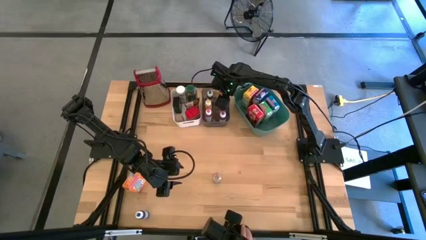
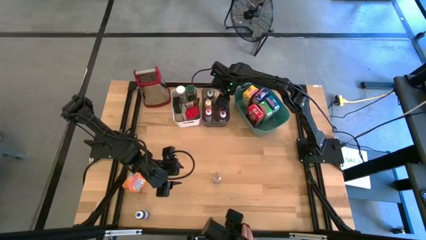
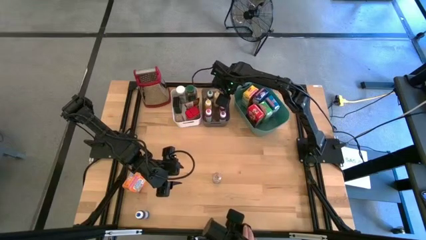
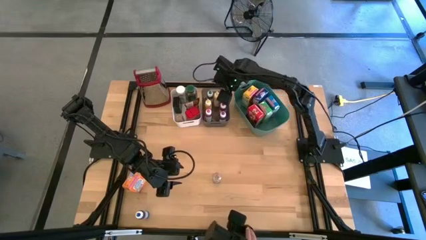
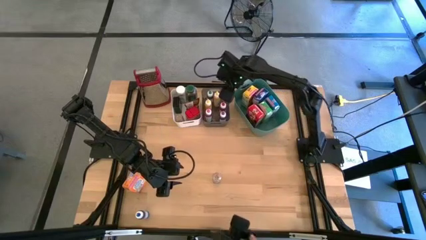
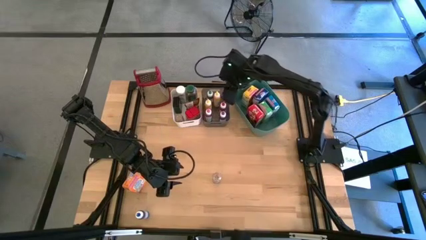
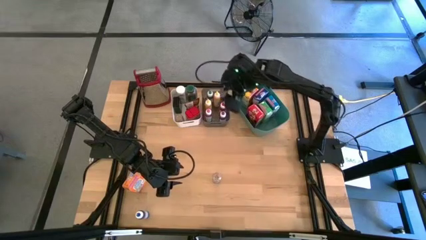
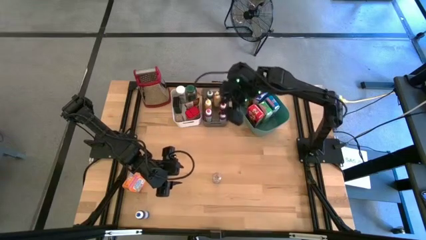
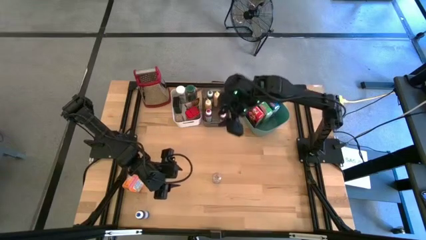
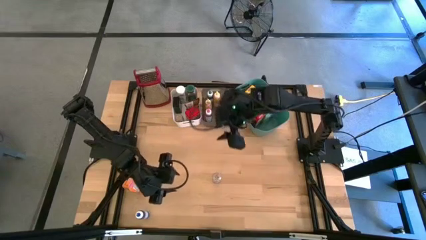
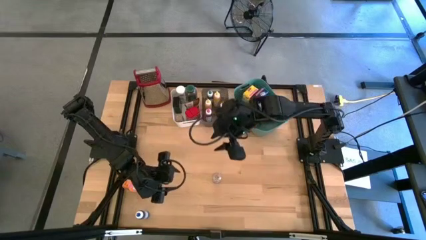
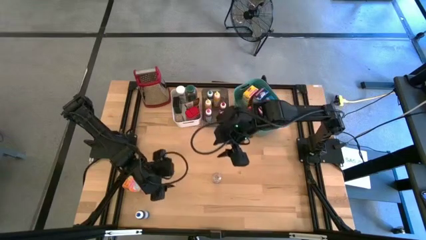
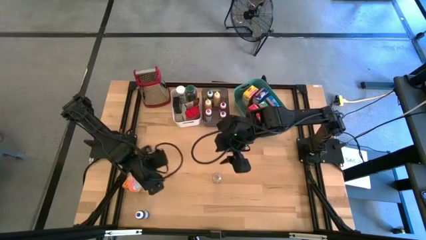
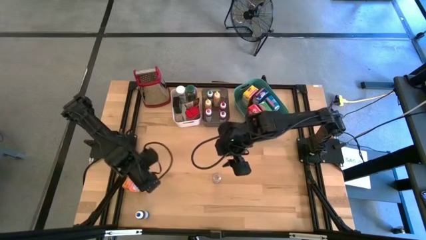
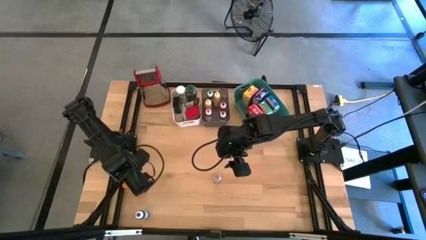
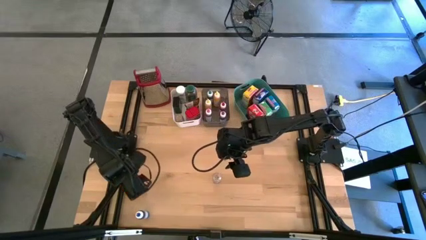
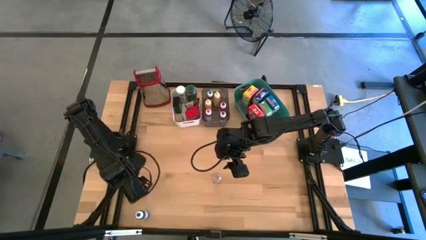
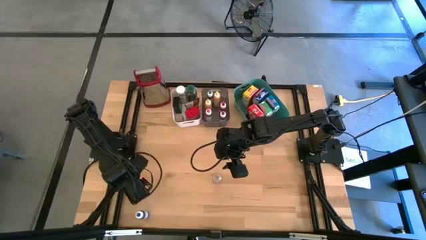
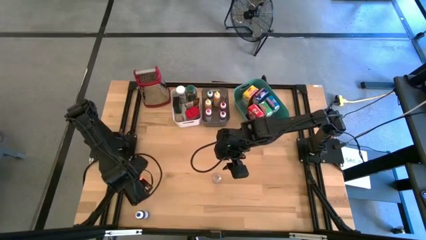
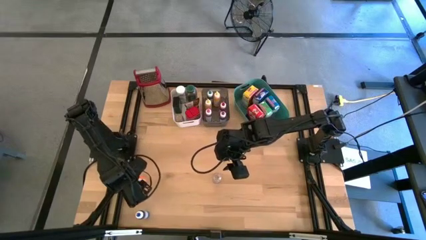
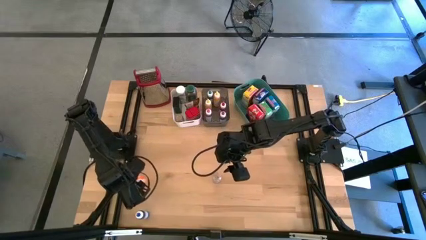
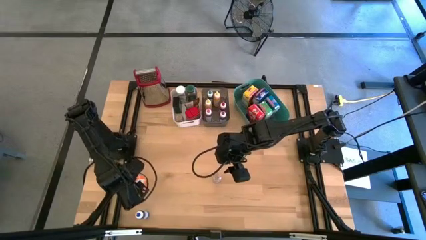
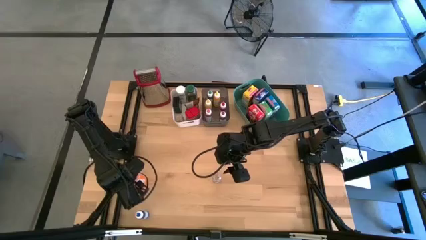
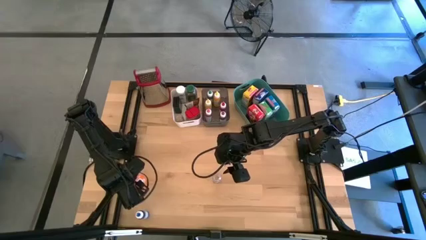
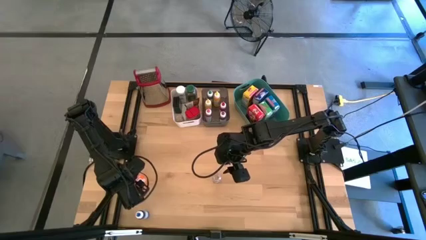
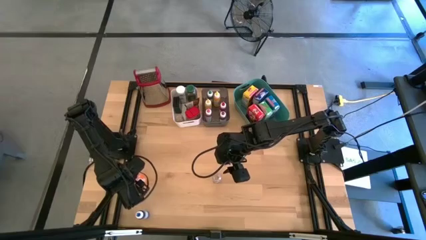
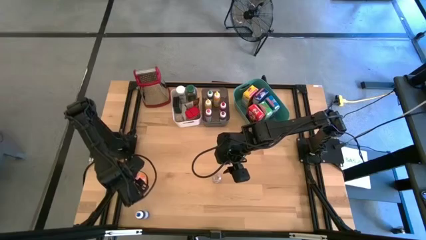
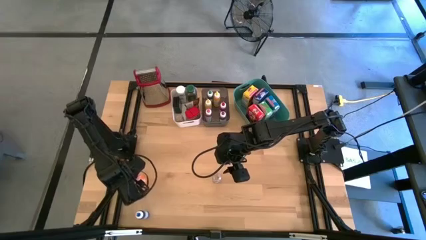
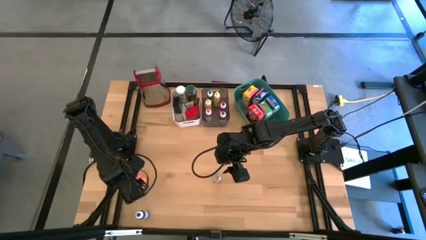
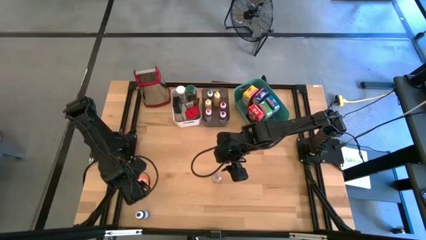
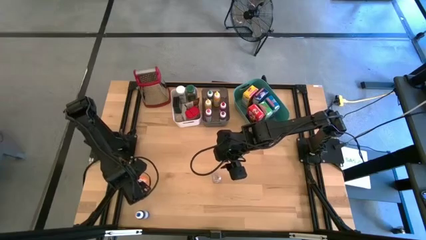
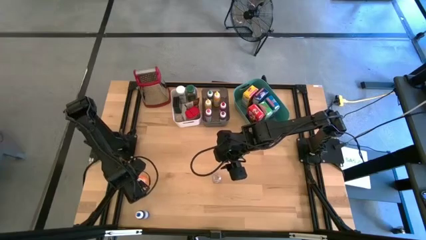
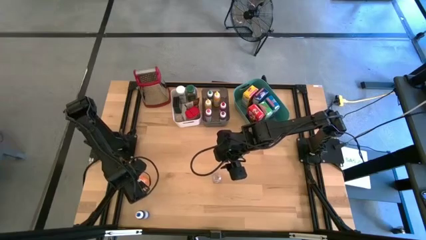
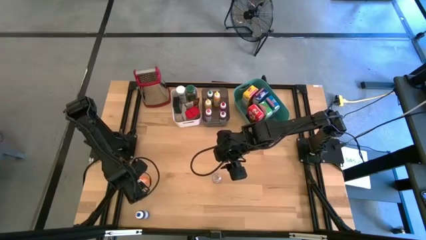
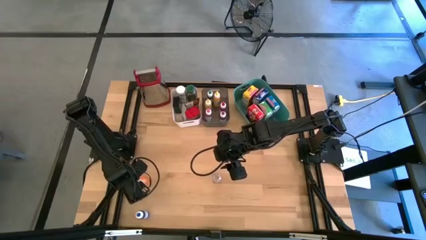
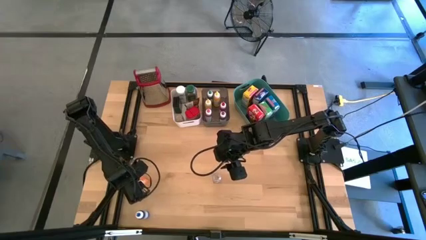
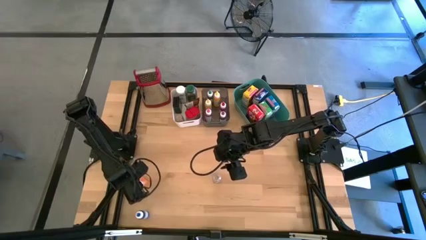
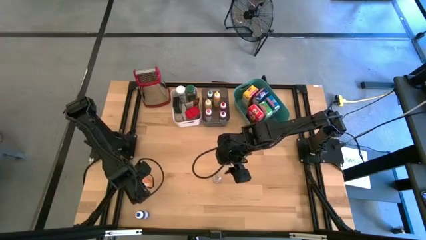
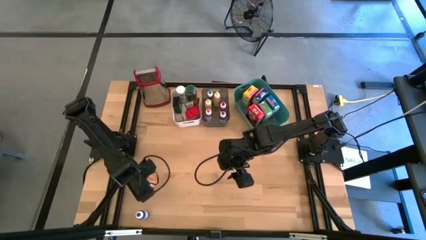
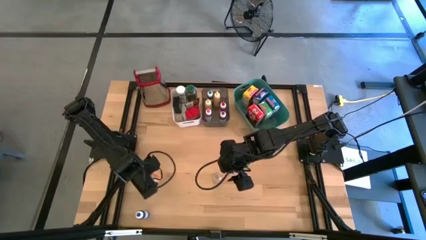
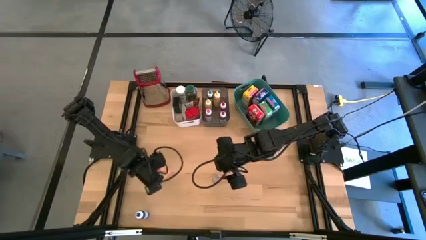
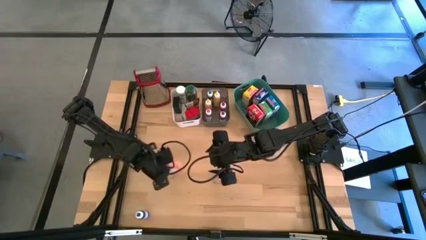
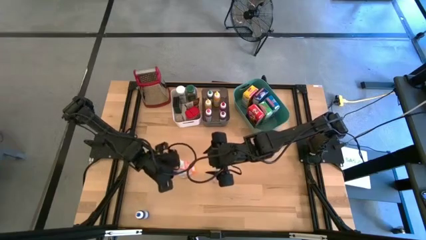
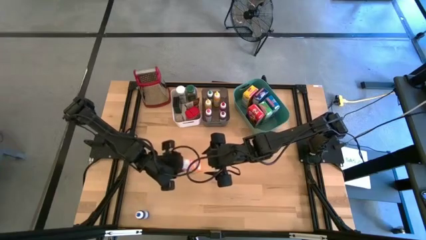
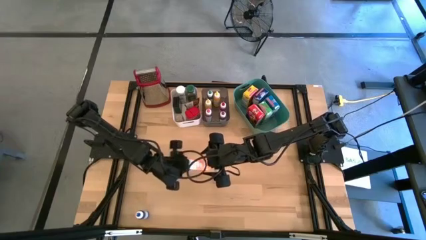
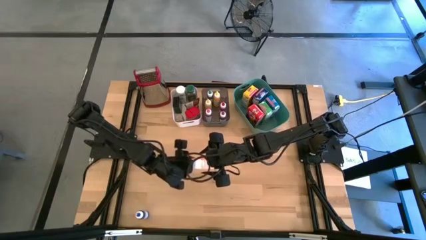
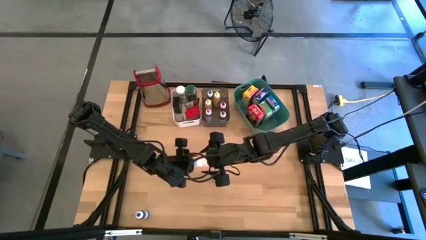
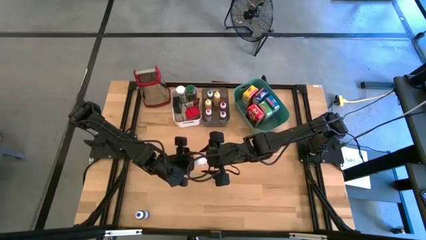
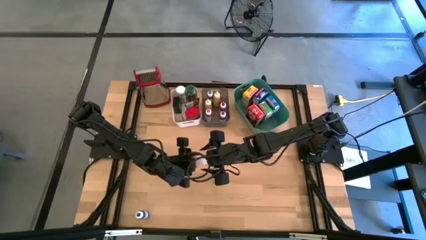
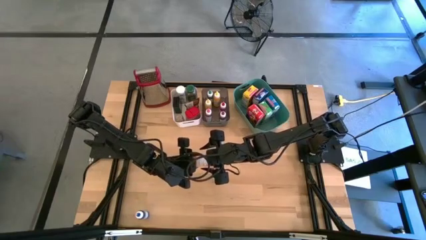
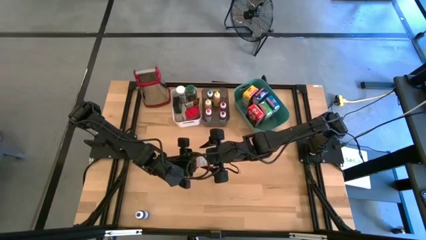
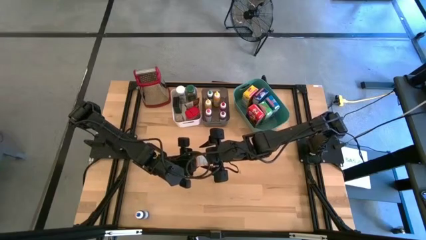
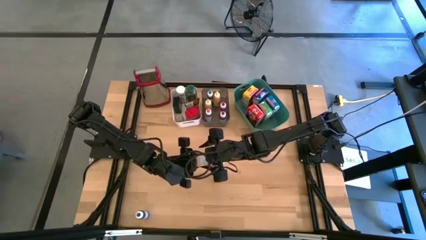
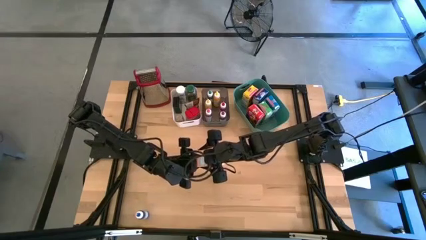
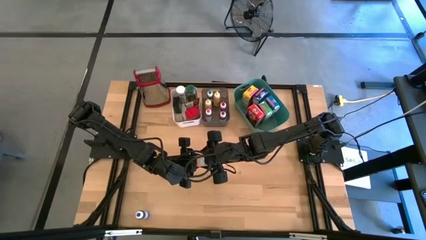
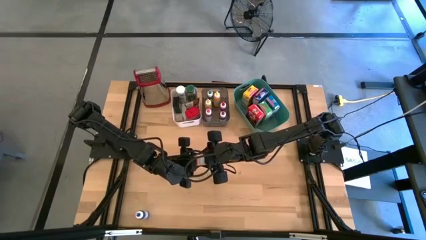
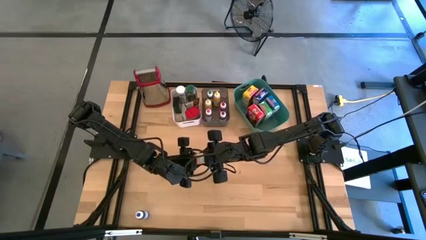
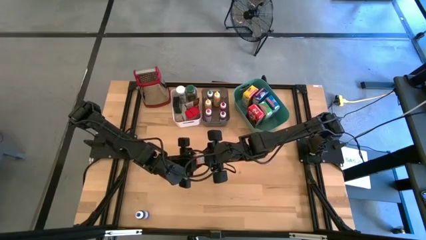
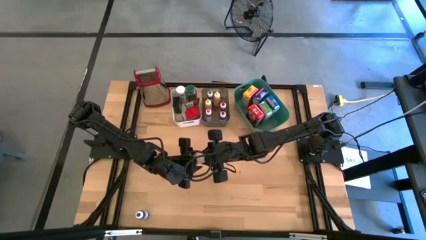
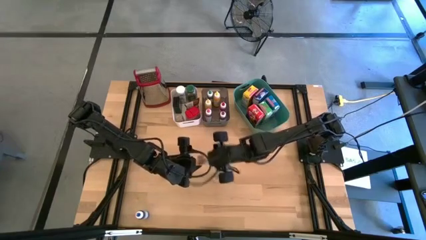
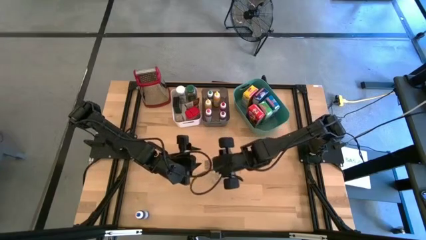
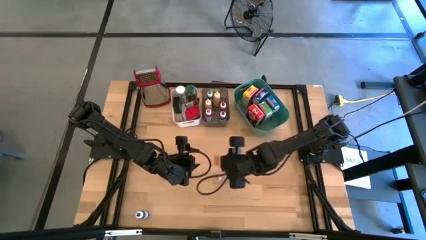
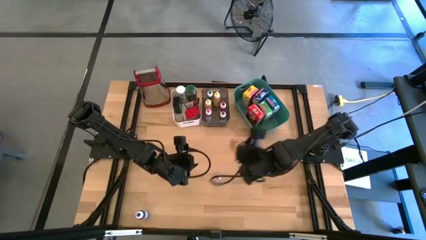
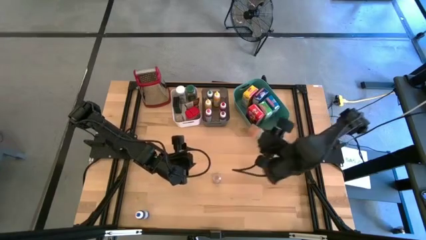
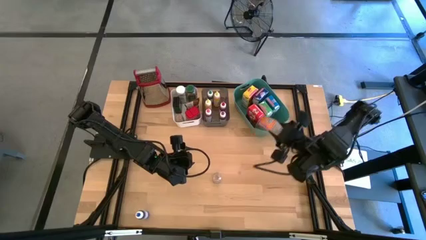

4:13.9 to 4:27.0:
Task: Pick & Place Kitchen Items
Put the orange cereal box into the right green bin

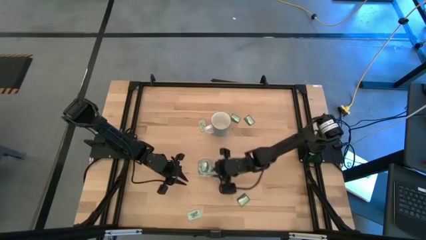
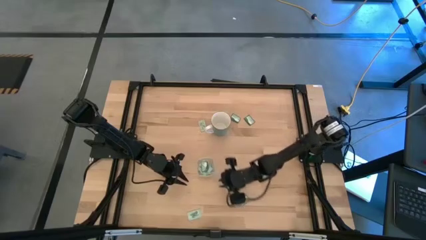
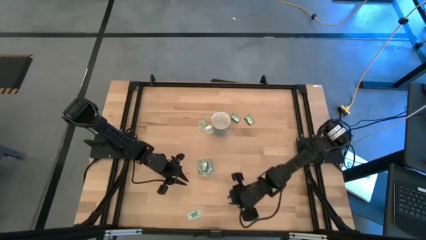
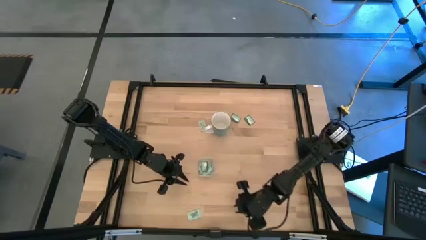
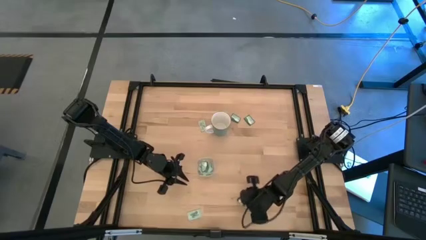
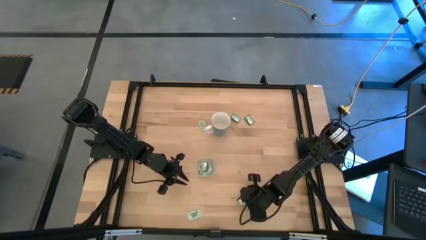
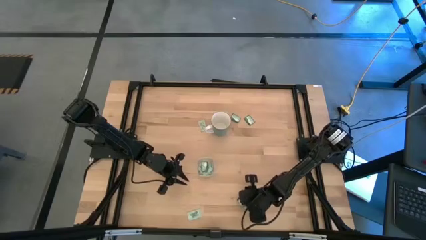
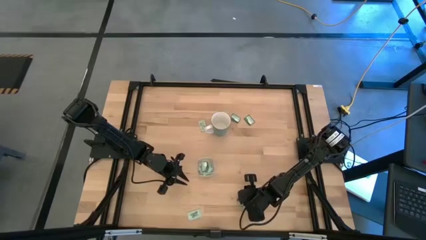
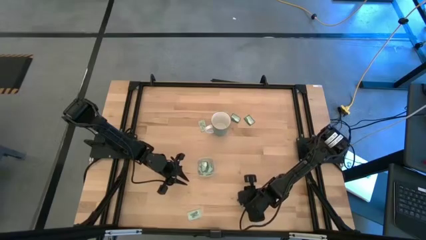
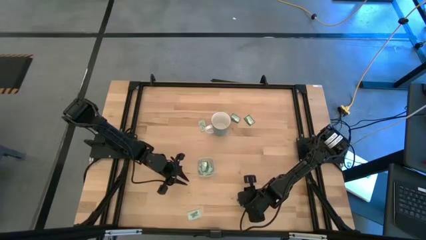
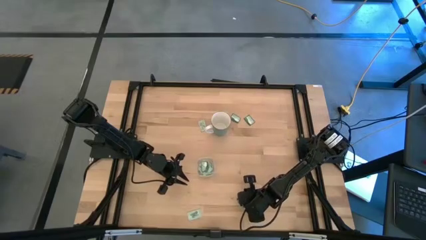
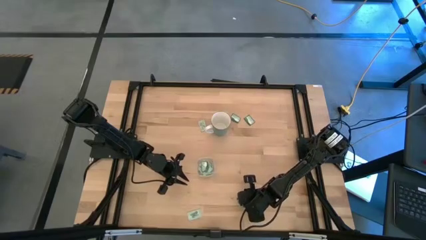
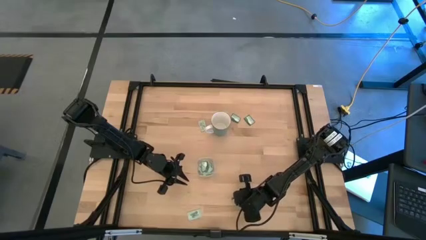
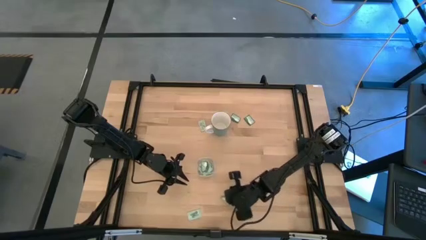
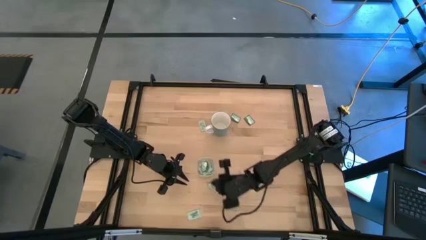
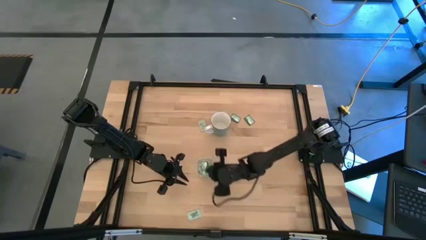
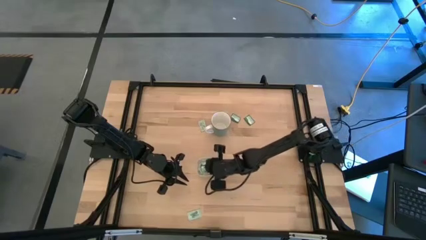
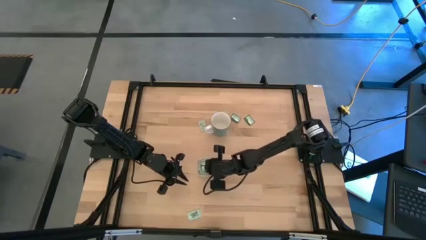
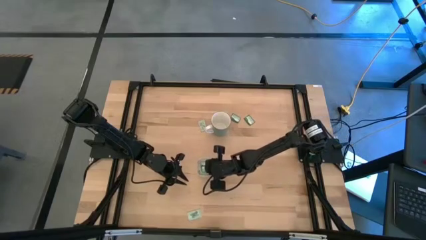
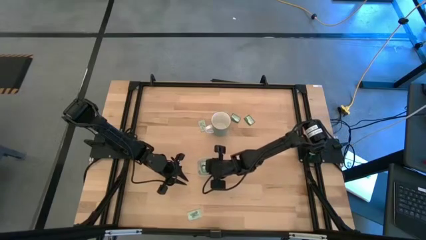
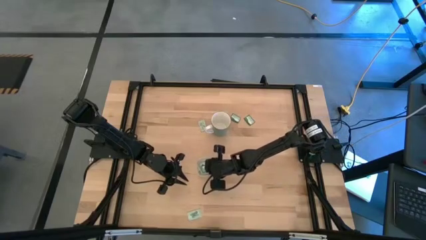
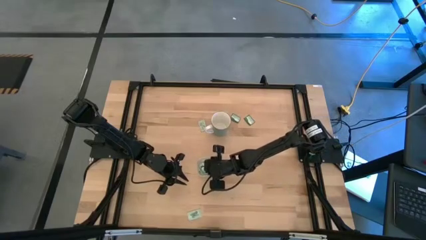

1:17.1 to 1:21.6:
Task: Pick and place Stevia / Truvia into bins
Put the green stevia packet into the transparent bin
